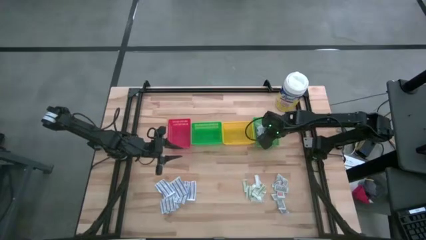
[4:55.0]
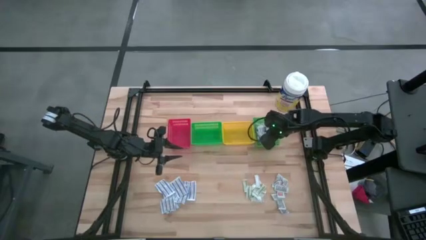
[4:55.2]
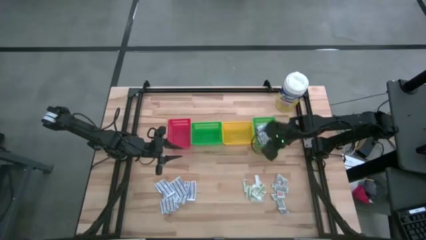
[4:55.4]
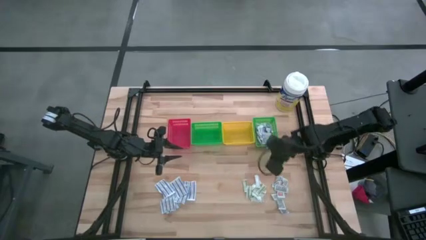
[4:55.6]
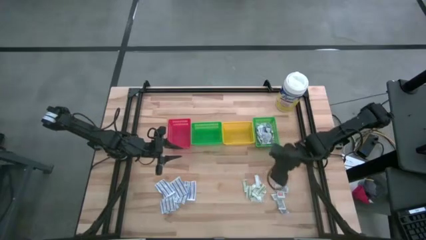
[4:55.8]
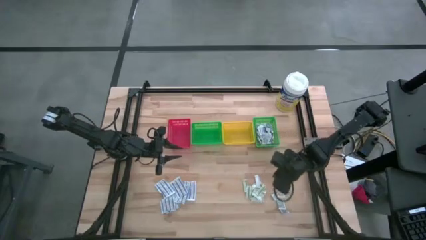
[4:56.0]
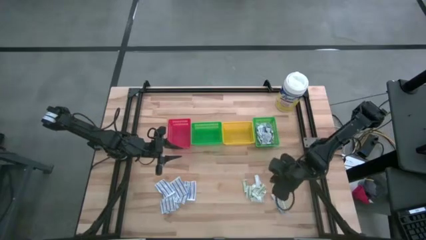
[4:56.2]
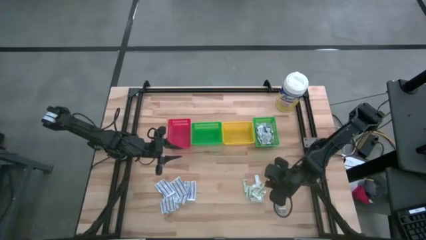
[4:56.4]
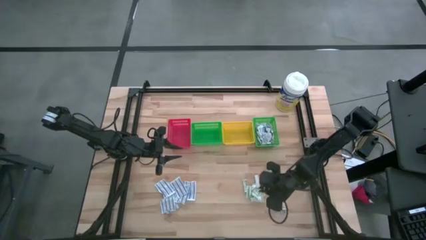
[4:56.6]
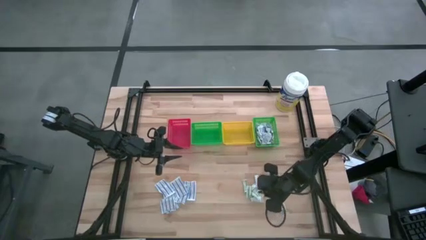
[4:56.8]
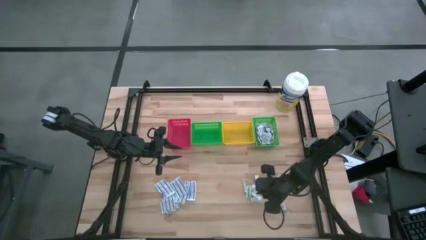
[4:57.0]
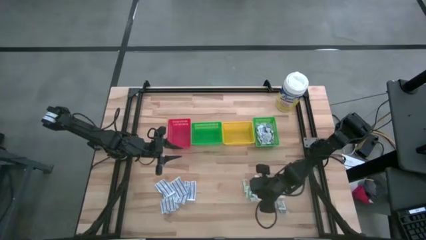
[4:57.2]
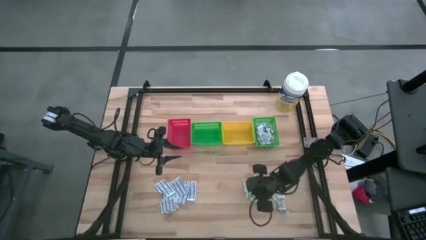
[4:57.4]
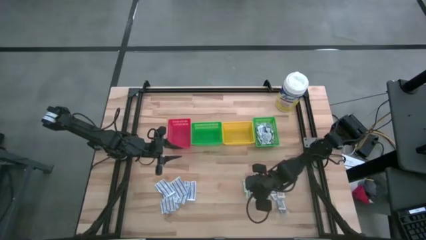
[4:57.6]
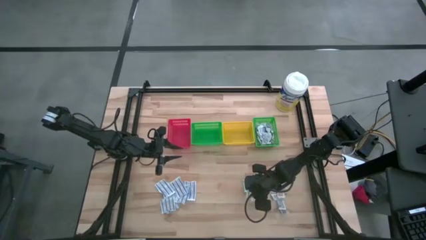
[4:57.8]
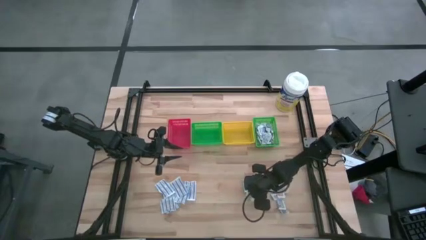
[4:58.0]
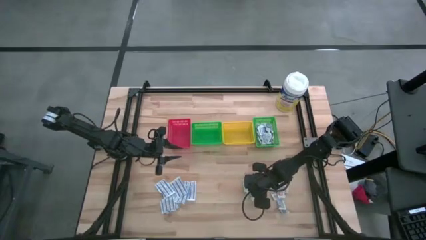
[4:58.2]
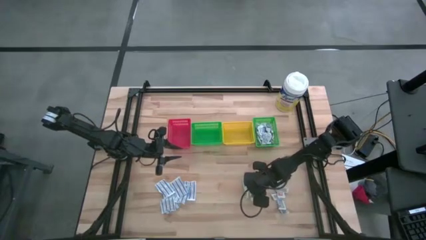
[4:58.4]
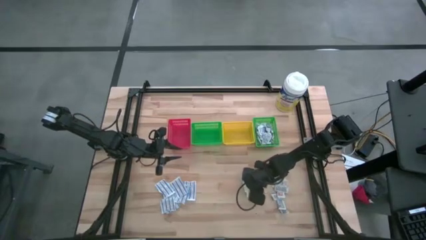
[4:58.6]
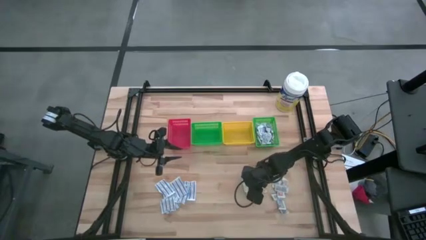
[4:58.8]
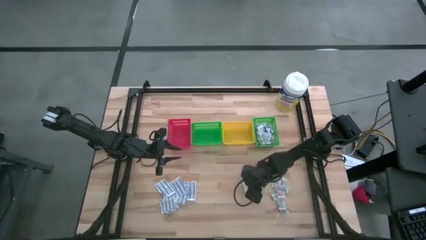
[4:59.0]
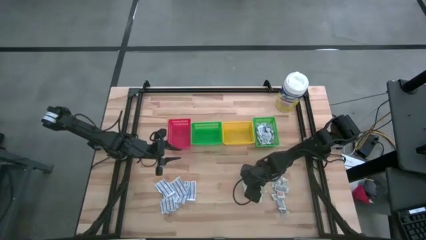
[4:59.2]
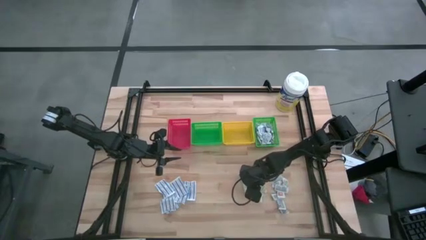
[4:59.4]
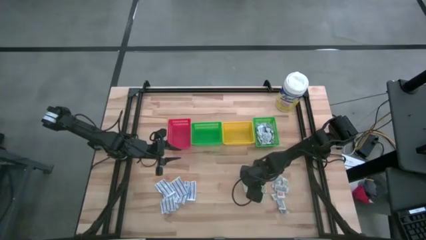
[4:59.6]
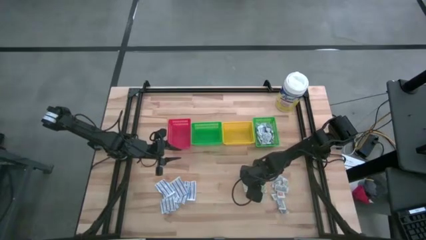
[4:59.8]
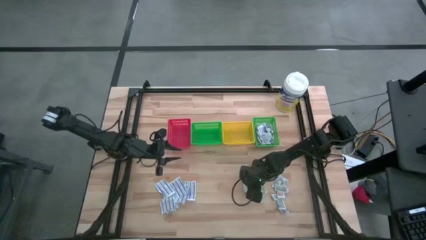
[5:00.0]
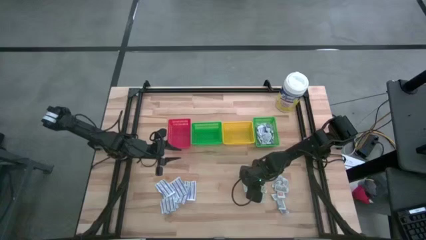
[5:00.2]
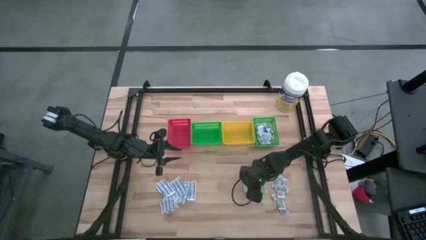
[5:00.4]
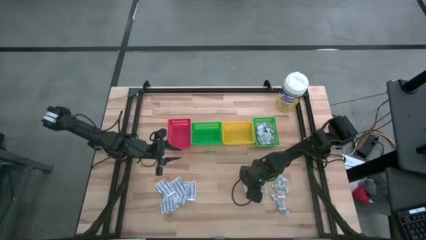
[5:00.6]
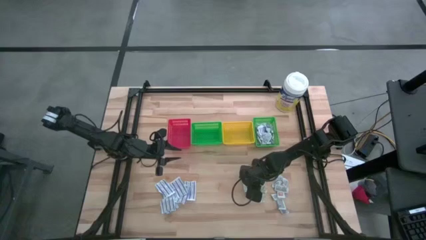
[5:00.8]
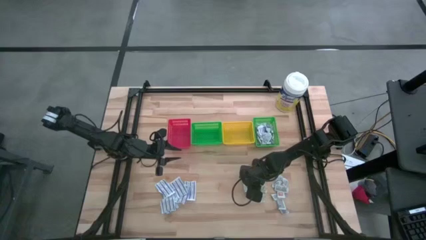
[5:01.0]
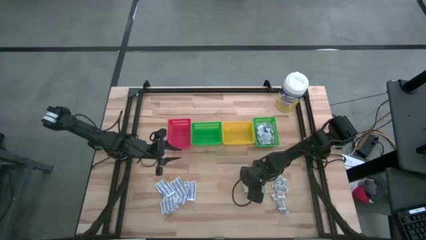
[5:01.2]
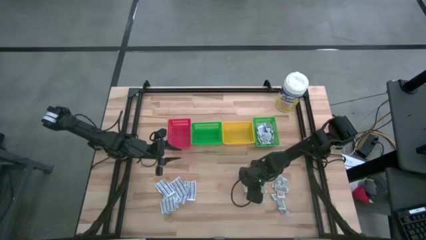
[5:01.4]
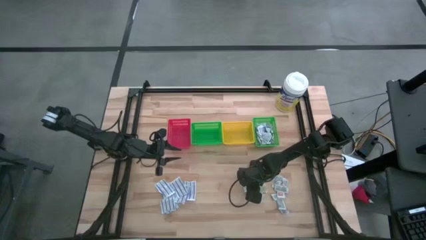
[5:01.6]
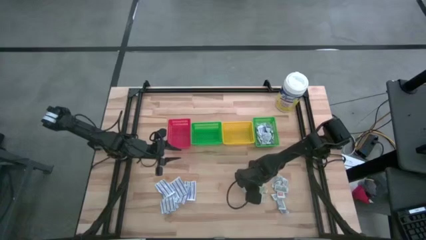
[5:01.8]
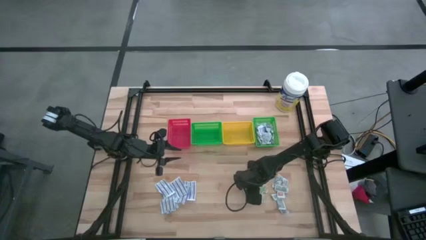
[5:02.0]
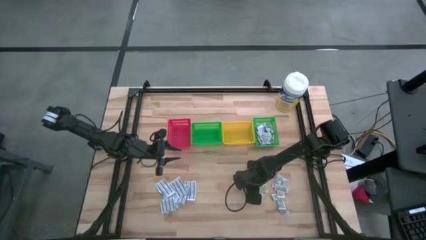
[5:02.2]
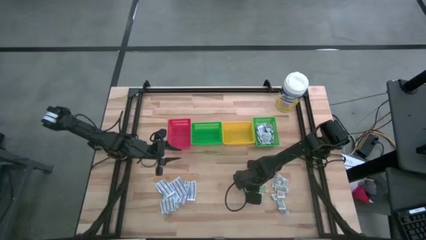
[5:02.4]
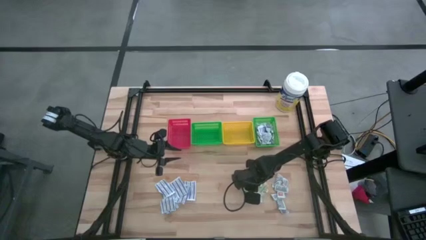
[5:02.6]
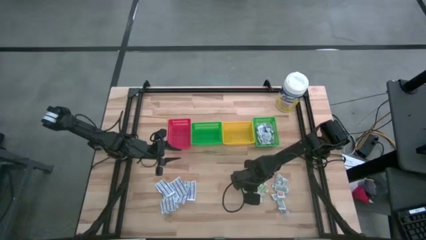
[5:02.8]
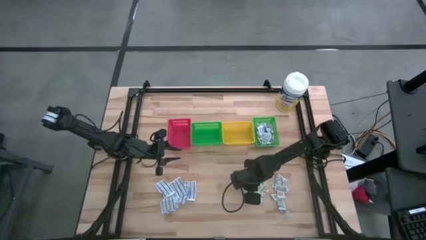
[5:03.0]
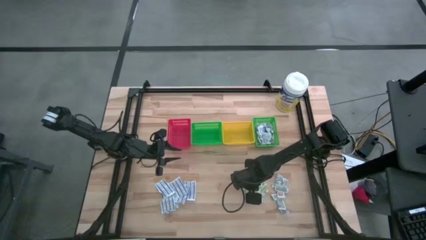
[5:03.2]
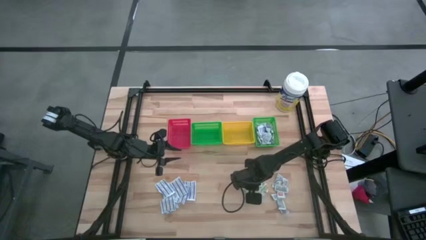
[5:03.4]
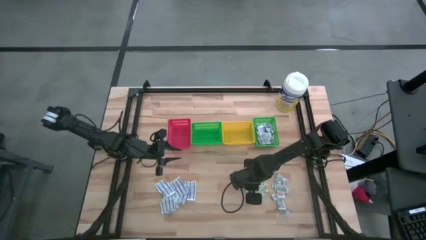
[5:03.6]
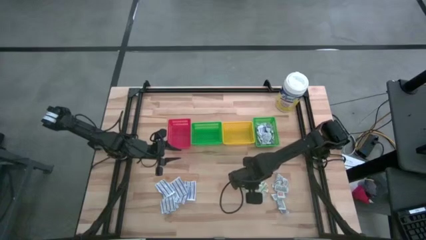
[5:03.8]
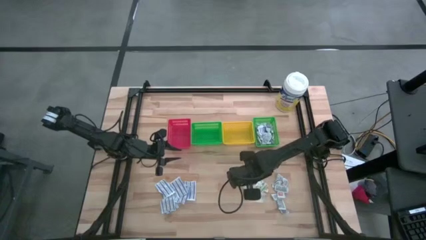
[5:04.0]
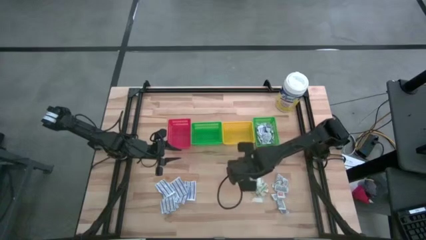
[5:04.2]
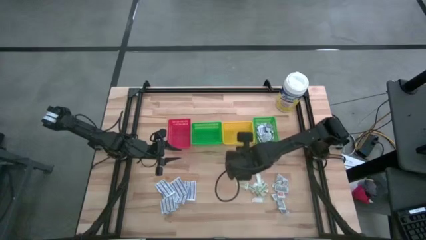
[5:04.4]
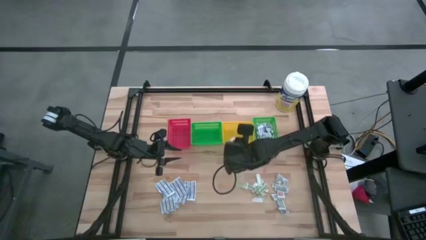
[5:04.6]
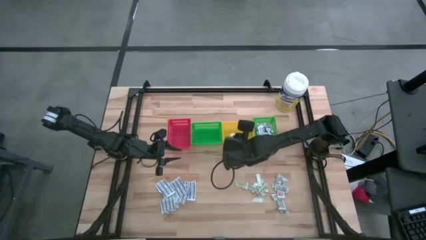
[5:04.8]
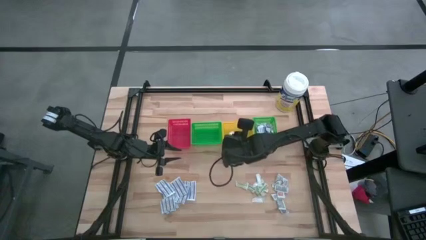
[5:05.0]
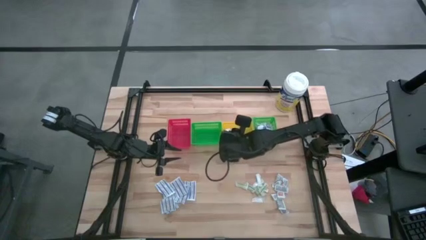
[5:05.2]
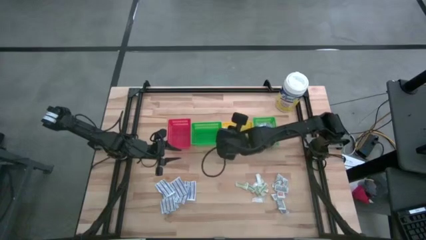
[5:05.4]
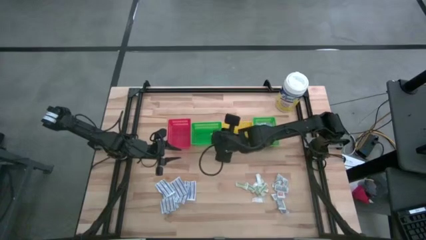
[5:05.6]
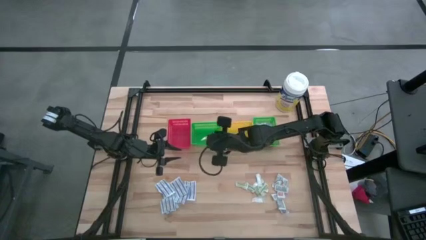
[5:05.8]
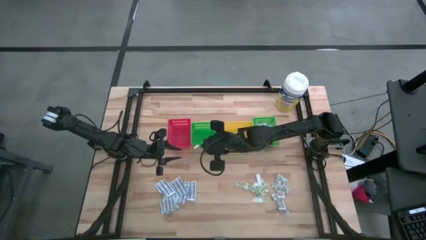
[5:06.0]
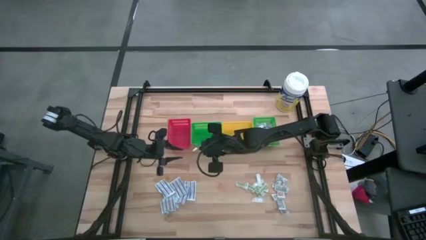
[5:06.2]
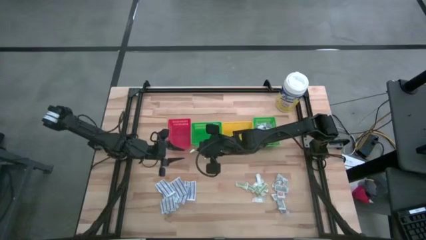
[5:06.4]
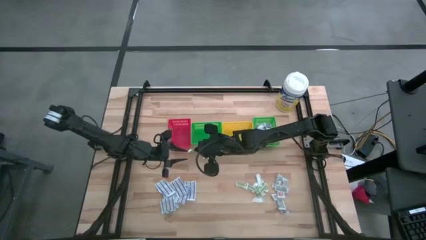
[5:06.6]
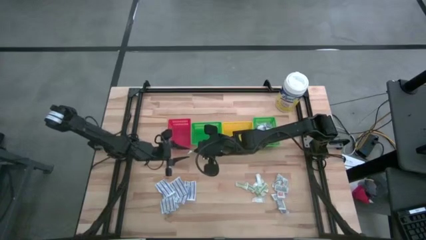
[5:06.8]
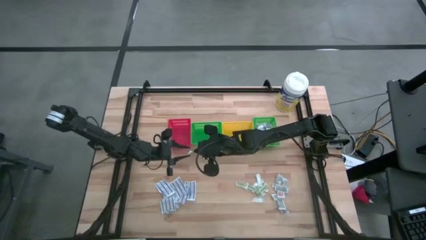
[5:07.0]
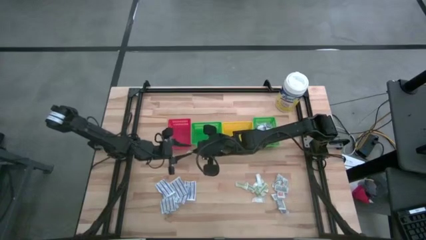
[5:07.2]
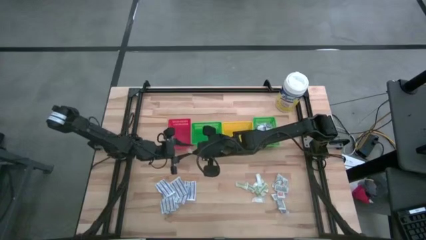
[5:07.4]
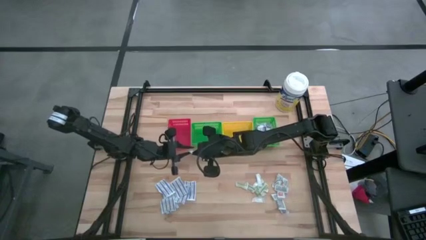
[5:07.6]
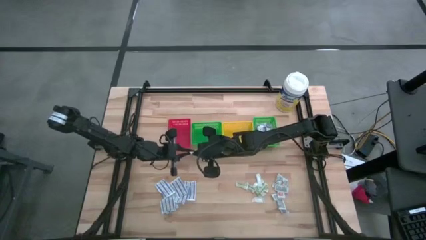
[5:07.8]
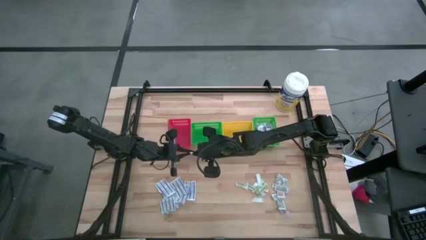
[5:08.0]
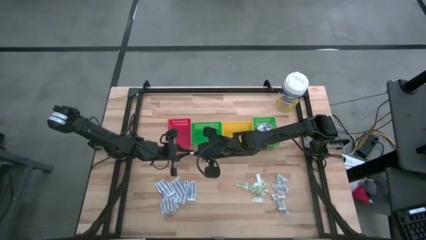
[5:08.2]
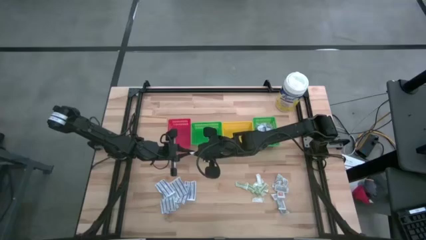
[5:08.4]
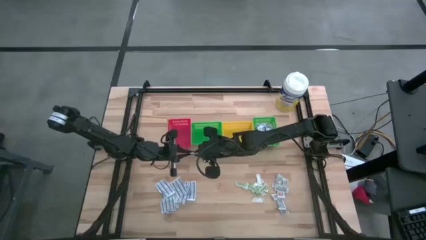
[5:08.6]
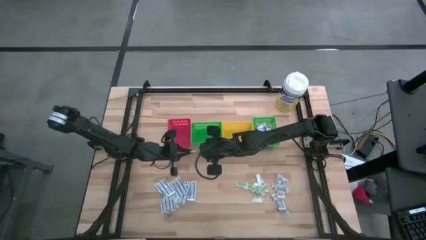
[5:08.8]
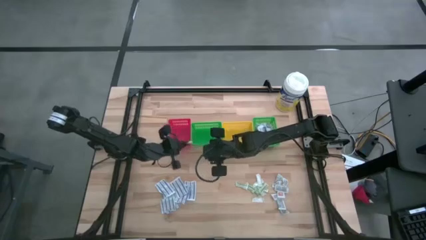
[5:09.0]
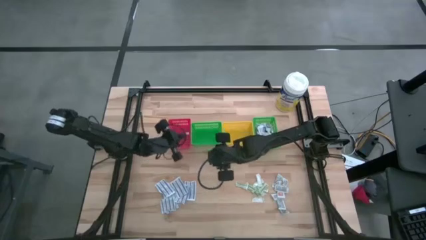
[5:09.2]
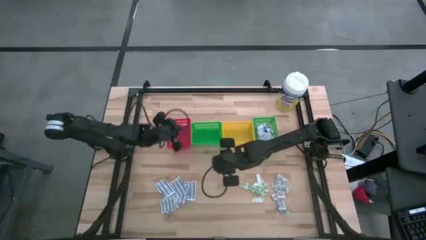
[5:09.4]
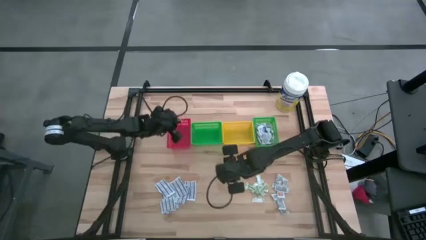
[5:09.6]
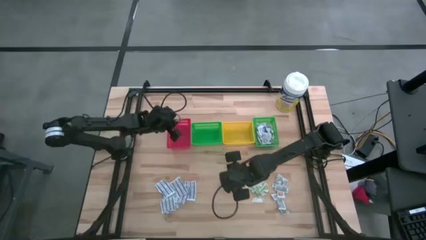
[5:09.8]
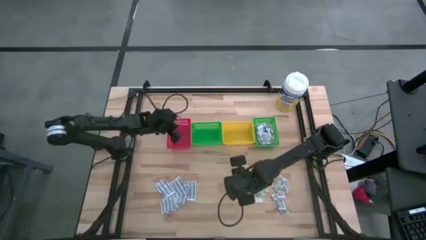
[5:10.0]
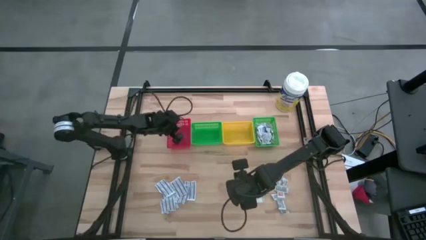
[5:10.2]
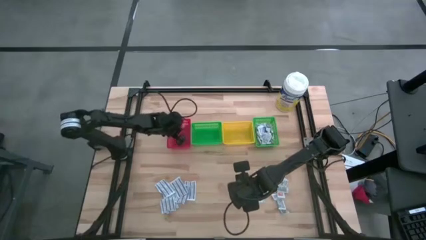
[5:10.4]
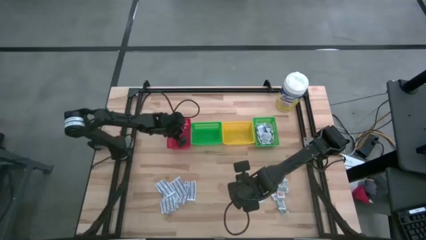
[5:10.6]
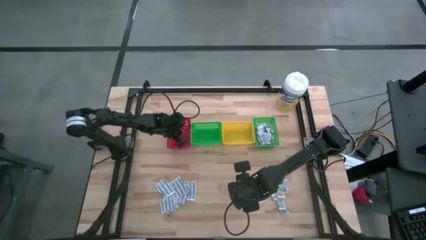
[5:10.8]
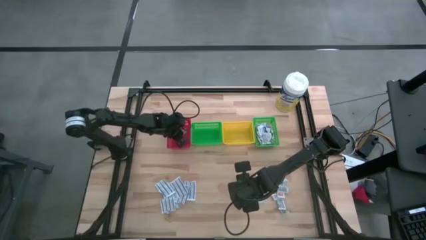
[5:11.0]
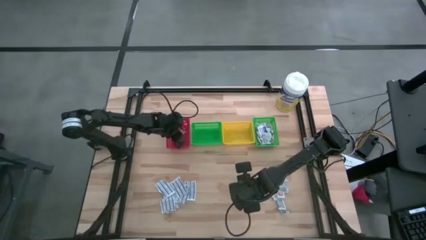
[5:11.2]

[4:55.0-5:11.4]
Task: Pick & Place First Aid Supplies
Put the green bandage into the red bin
